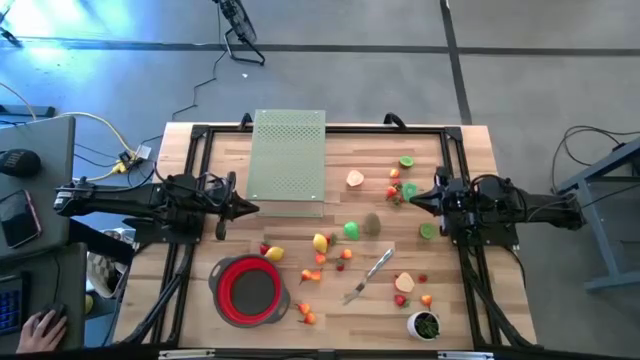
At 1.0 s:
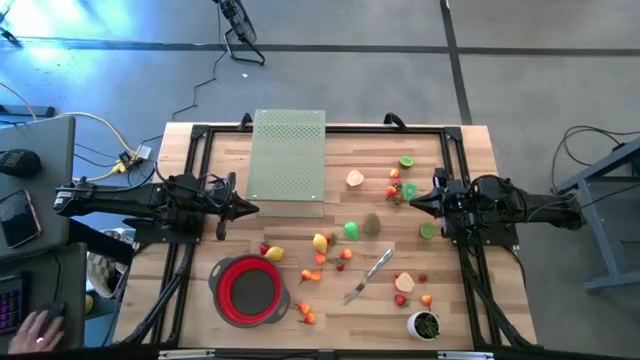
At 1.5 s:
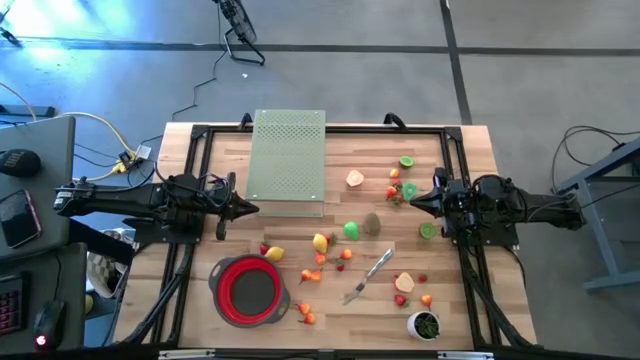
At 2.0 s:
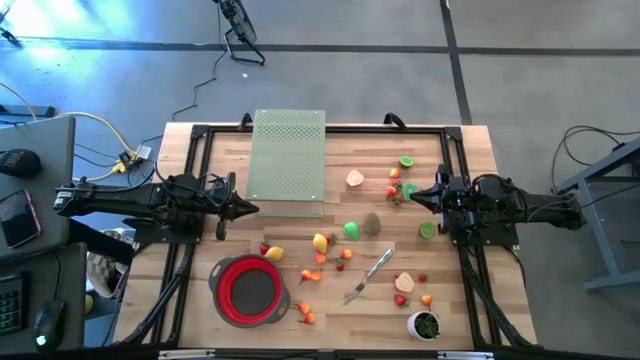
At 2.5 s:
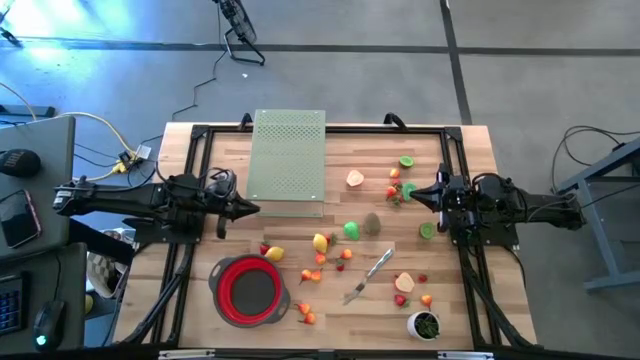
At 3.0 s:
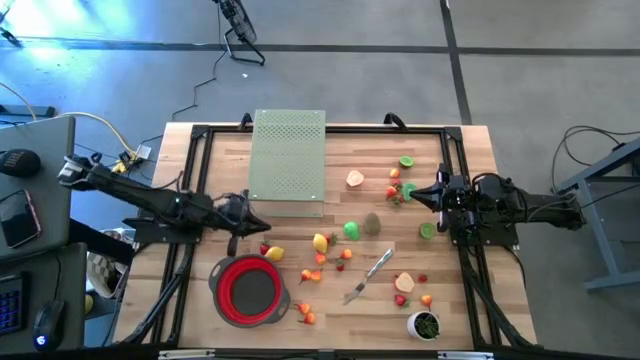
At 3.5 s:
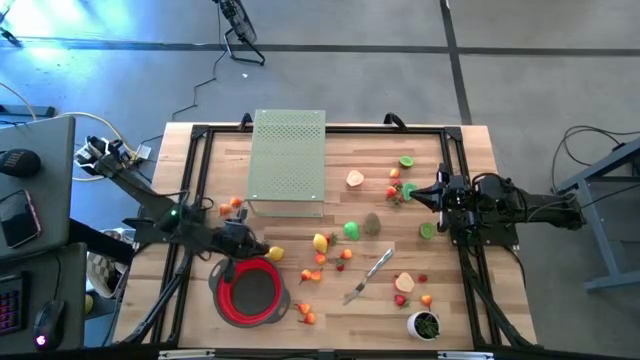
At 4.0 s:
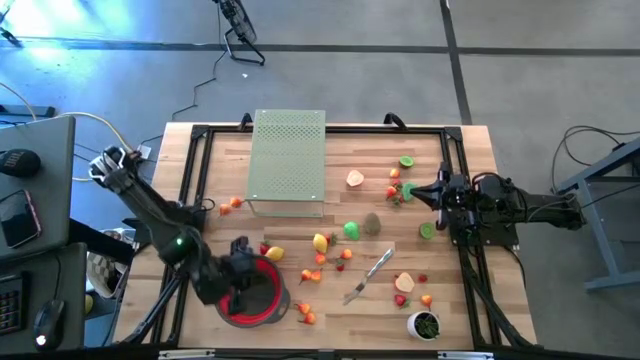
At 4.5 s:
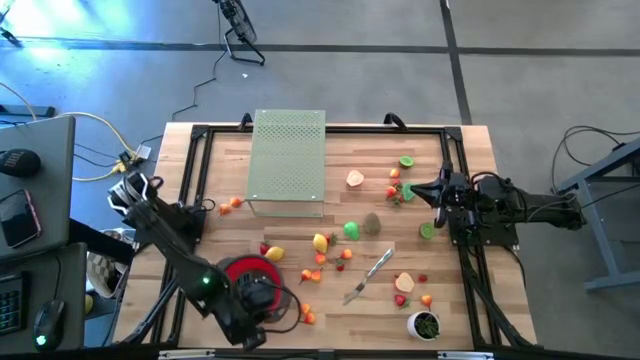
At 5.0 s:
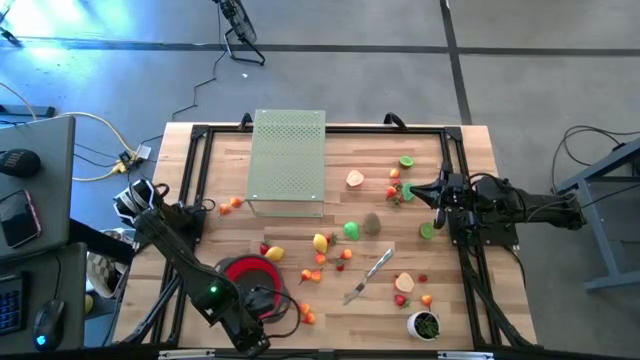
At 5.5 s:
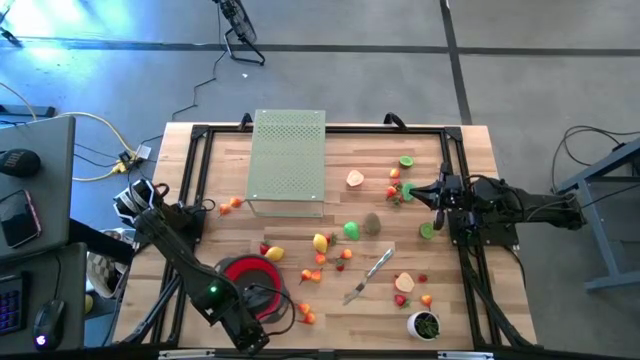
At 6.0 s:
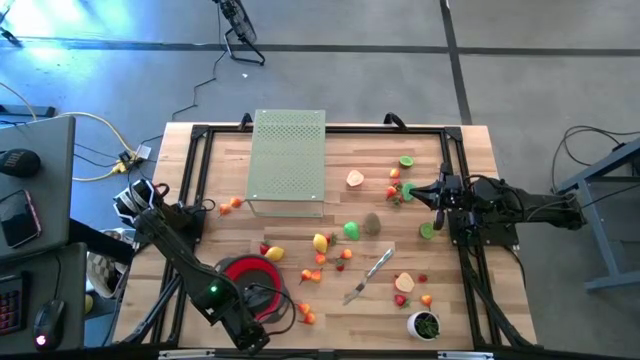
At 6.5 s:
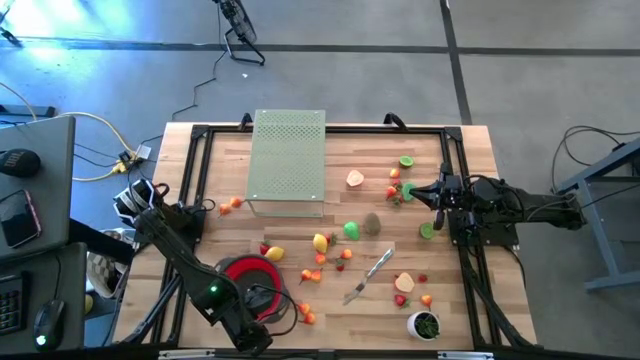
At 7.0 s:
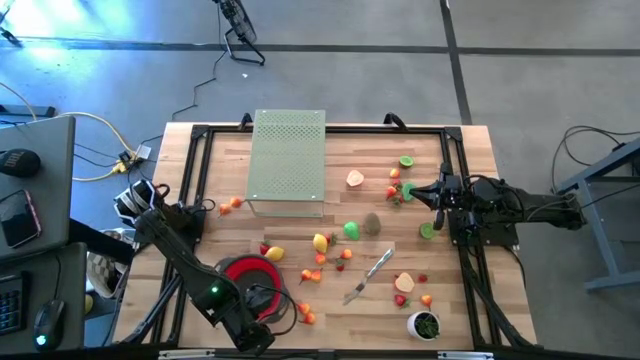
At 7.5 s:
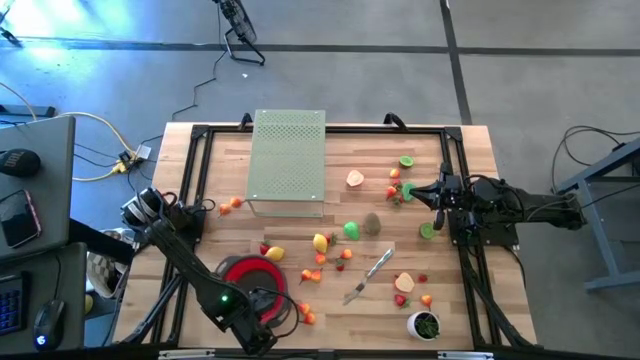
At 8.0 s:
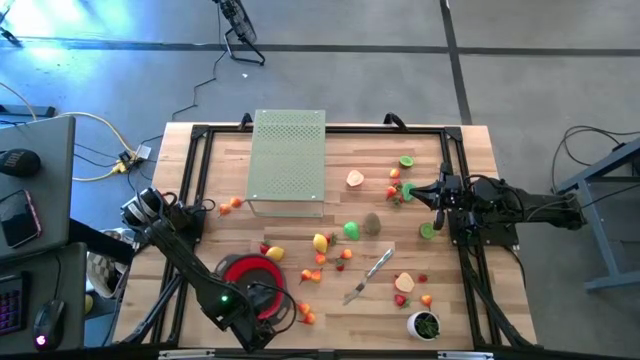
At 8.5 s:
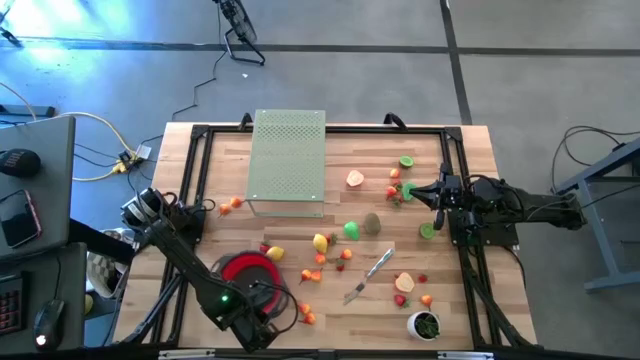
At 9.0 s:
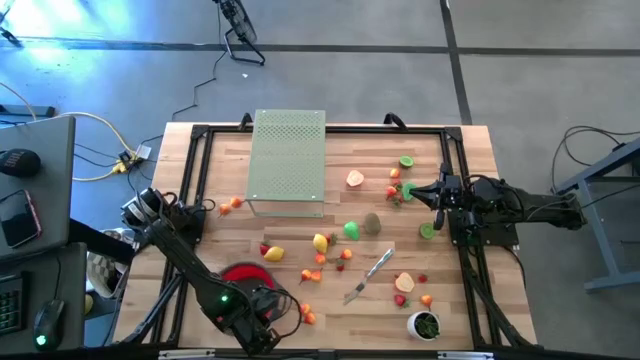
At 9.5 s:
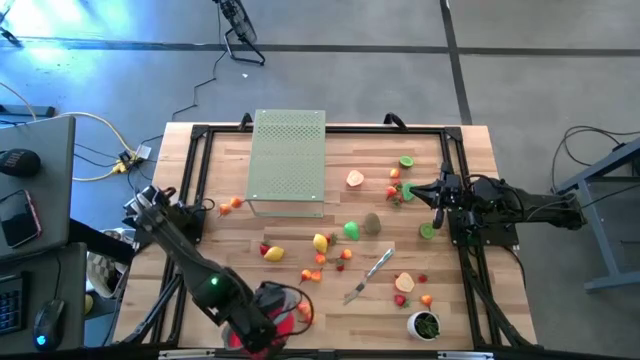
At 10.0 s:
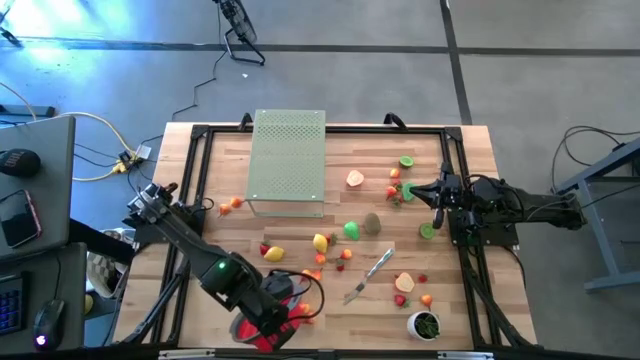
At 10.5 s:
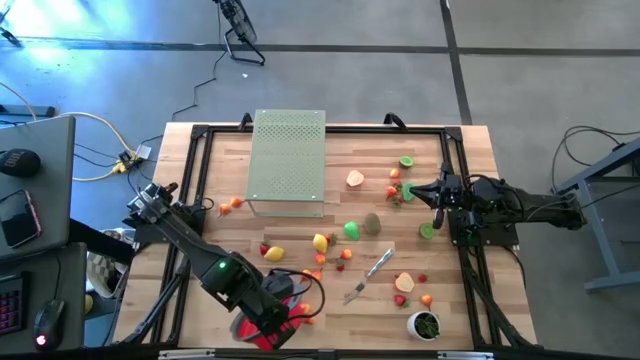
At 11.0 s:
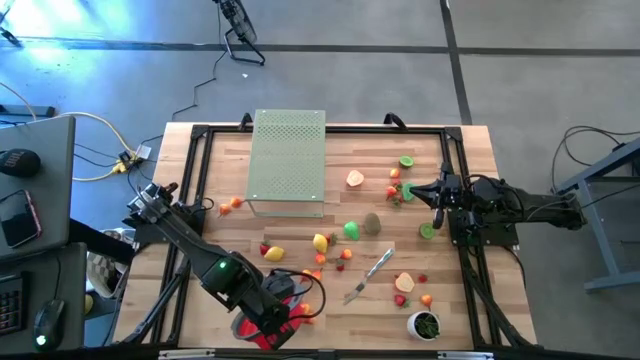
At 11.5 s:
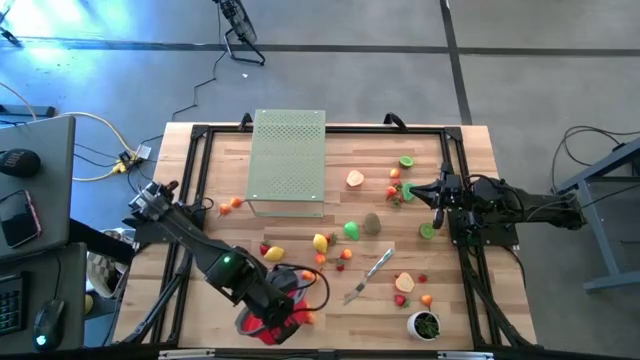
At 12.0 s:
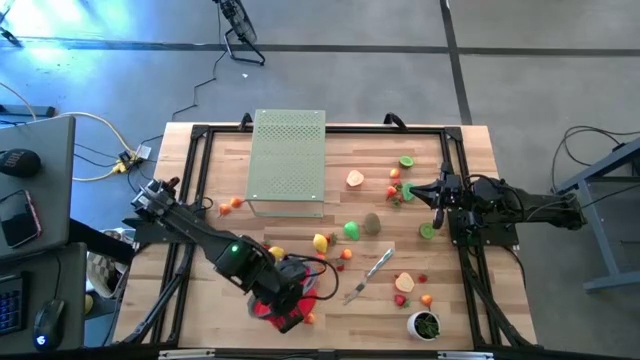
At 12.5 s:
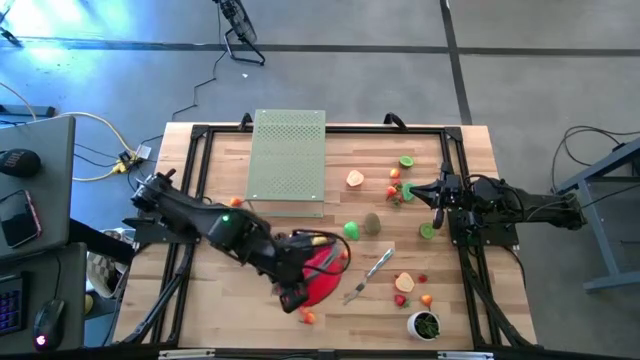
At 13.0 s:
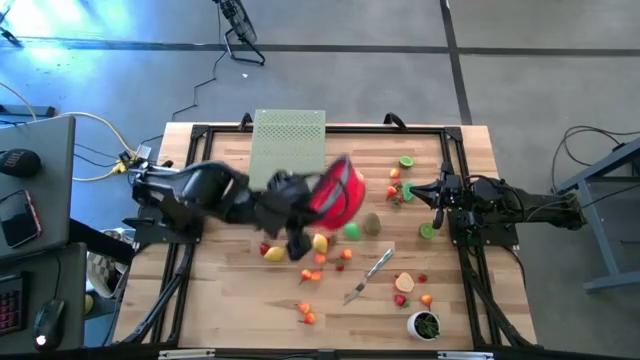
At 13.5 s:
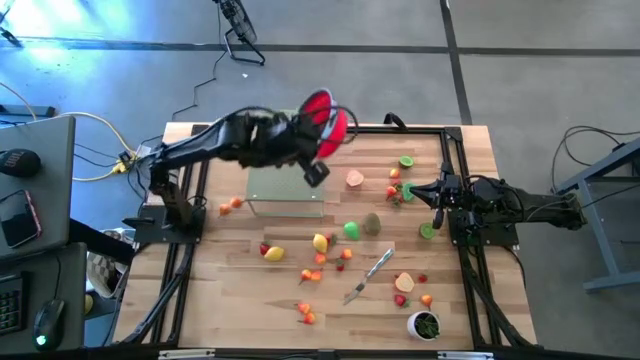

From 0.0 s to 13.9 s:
Task: Pick & Place Fruit
Put the red strainer on the shelf
